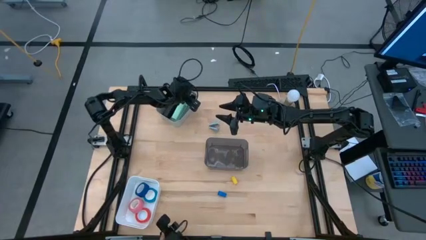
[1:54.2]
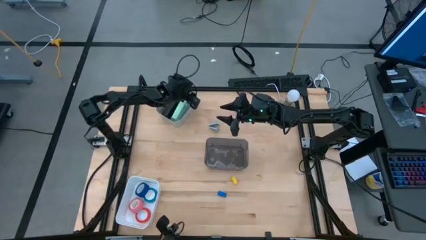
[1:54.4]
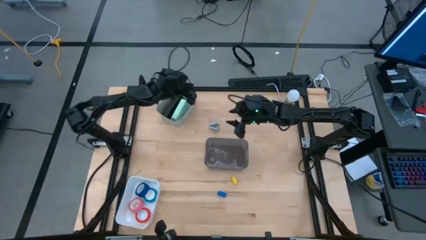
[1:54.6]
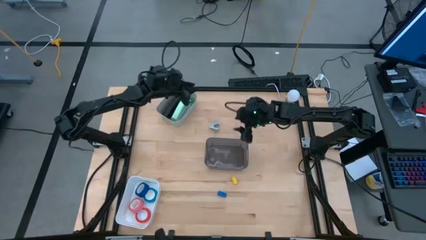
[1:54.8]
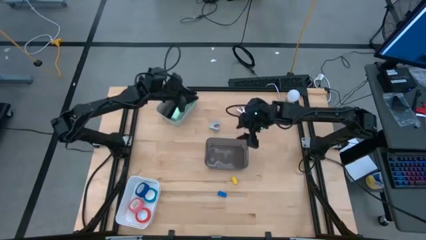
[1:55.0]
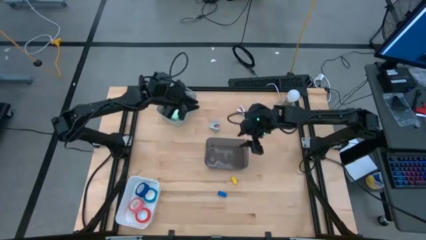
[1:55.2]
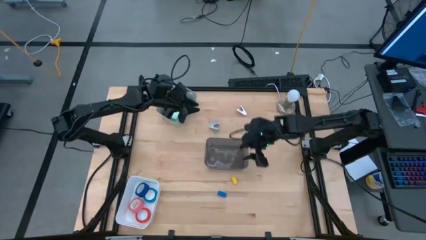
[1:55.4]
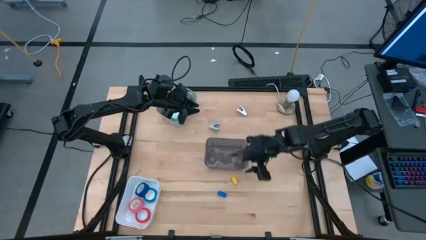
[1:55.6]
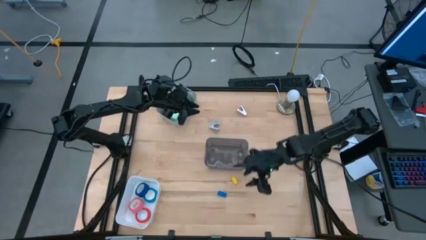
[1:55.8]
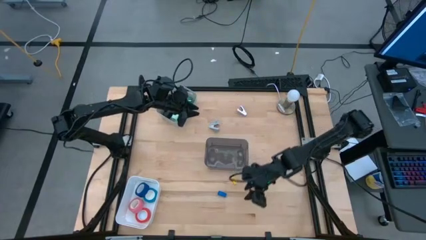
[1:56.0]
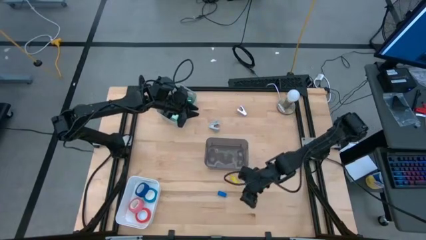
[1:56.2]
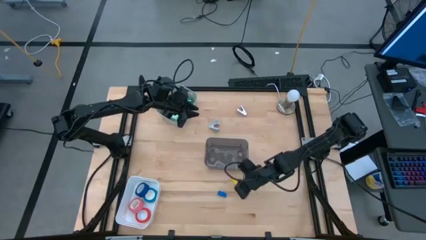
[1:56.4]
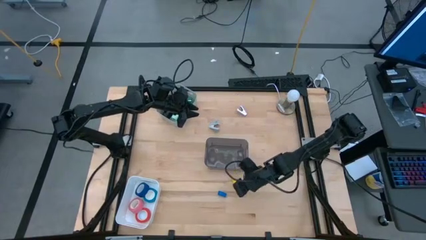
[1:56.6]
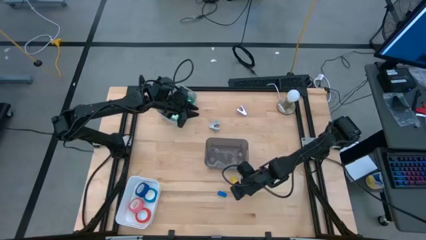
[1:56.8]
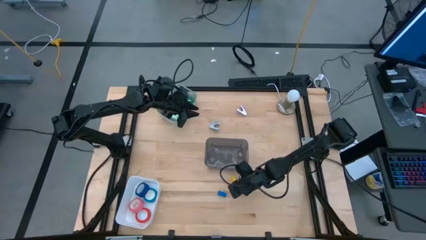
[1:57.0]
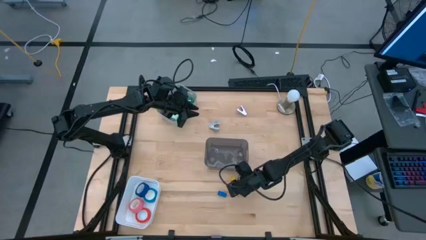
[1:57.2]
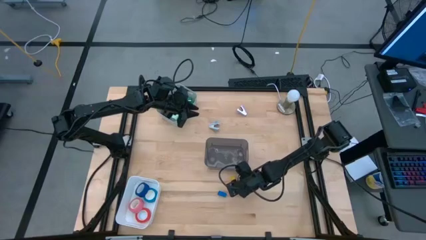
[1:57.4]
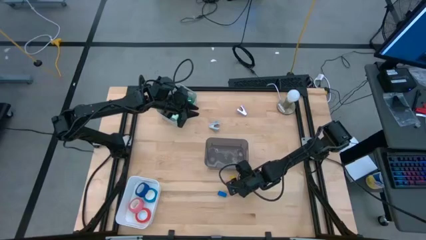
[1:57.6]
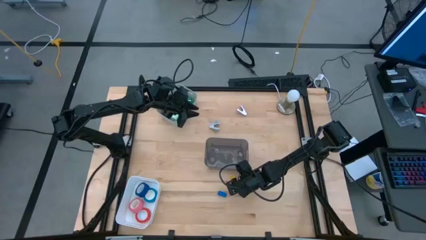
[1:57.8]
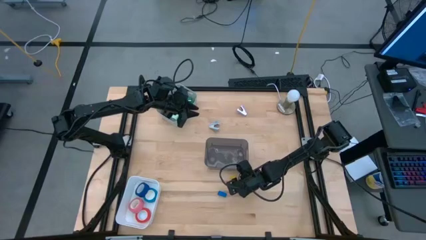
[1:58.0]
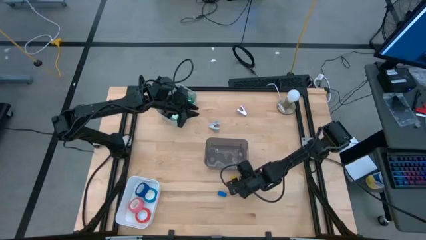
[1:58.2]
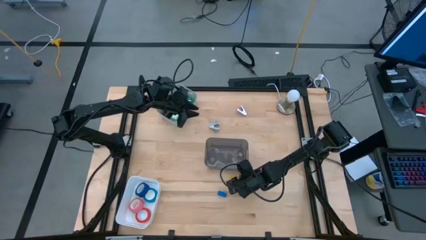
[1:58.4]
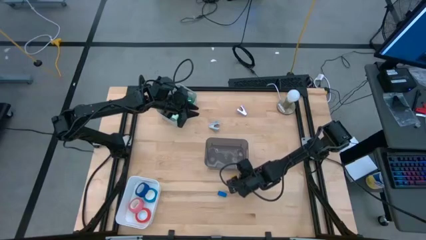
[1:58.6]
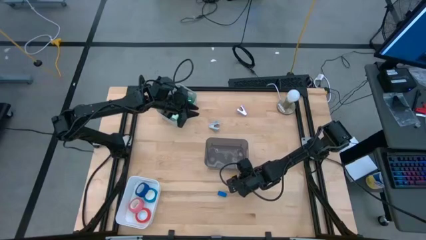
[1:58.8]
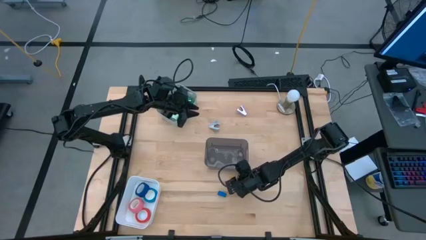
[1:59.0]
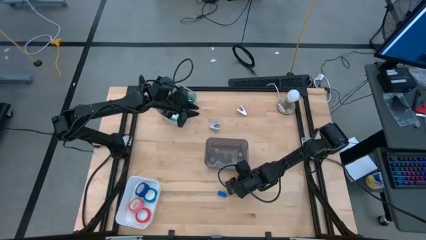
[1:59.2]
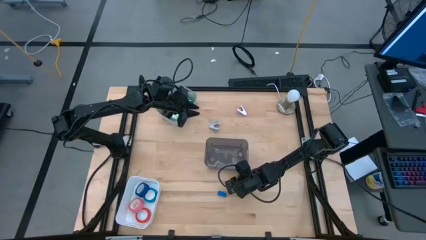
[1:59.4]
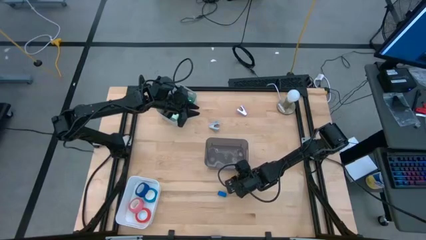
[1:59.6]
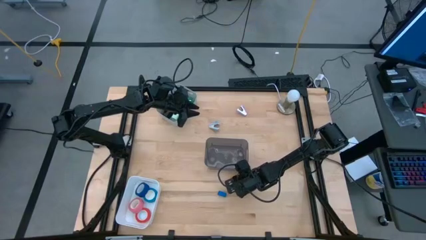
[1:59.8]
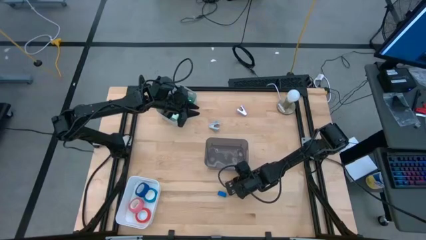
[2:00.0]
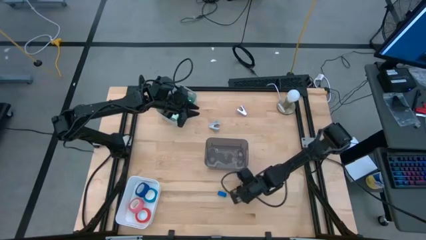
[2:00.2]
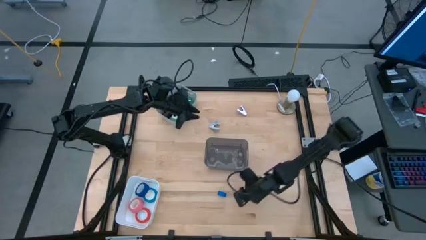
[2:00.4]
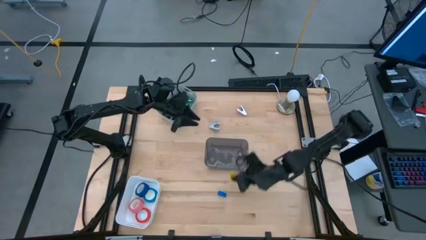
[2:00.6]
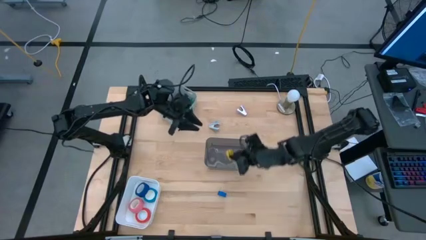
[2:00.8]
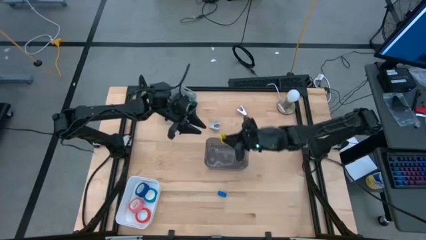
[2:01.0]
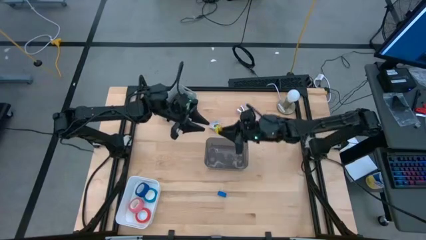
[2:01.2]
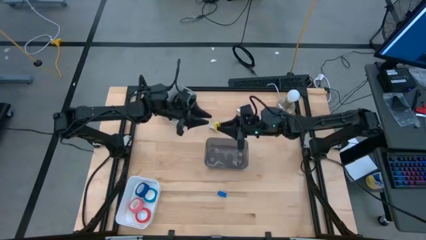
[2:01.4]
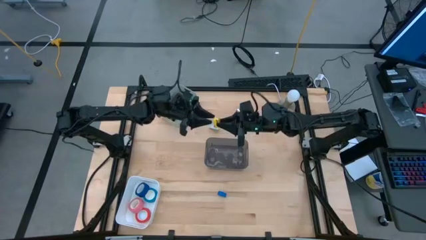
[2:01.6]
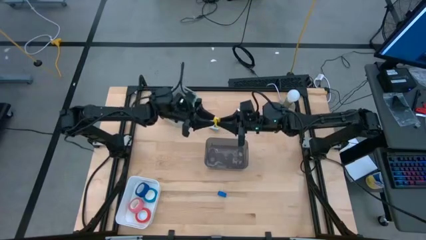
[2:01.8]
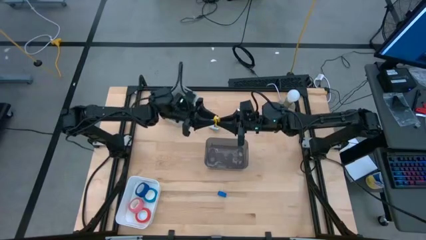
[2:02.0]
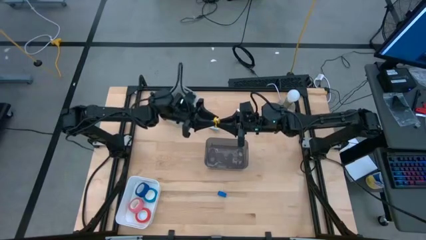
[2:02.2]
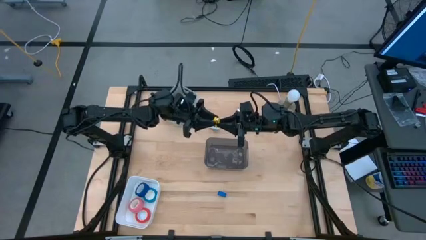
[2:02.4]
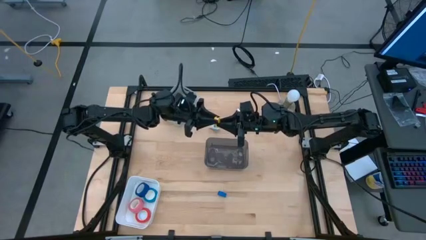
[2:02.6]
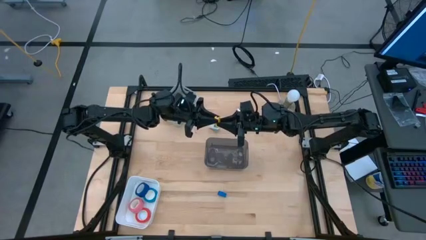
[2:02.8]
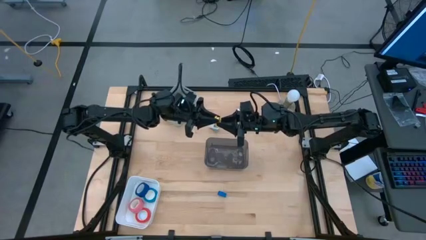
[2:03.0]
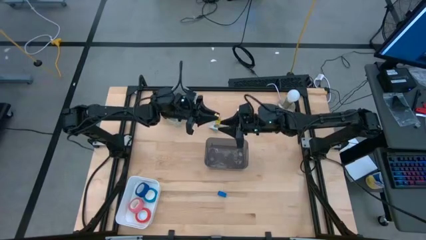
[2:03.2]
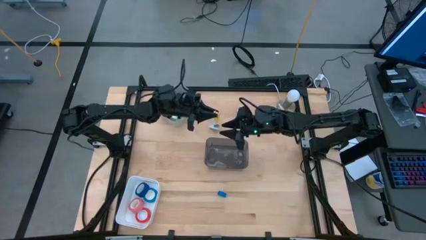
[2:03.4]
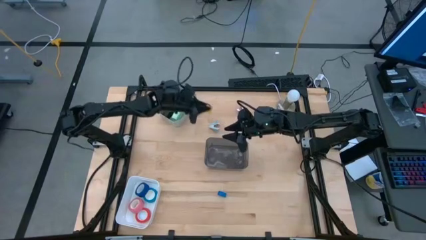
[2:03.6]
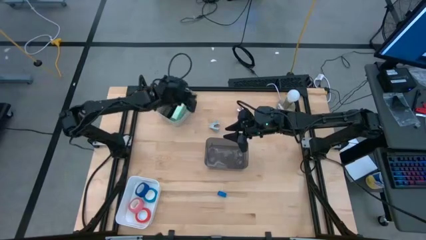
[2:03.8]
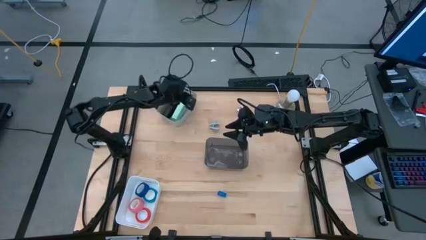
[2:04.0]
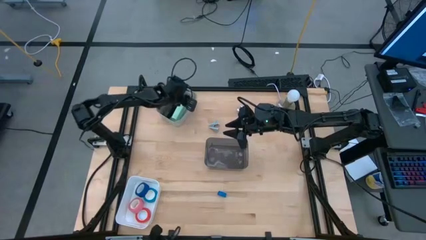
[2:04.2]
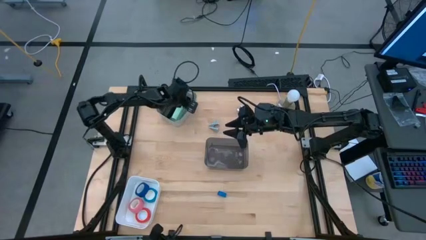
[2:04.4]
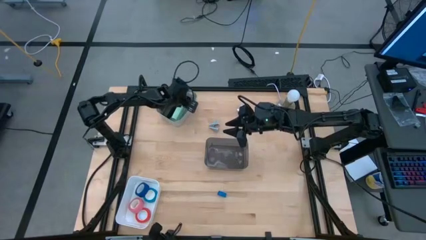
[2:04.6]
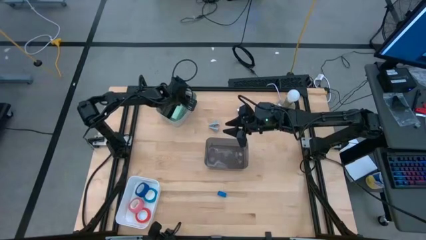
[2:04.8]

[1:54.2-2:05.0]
Task: Pick and place Stapler, Stapler remover, tape
Put the small yellow stapler into the gray bin

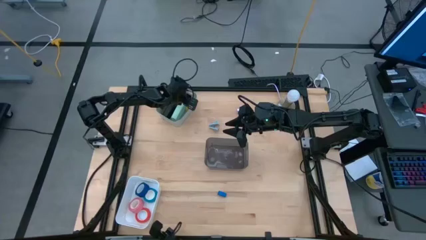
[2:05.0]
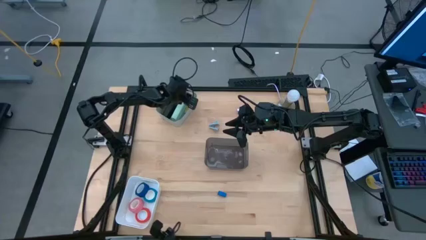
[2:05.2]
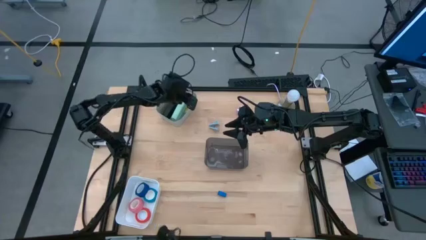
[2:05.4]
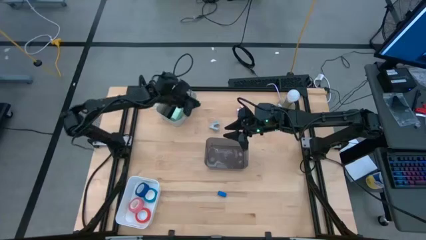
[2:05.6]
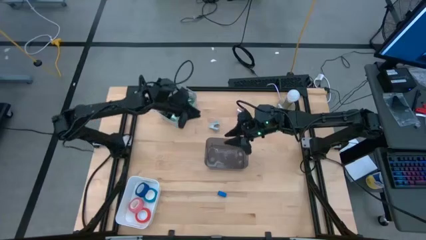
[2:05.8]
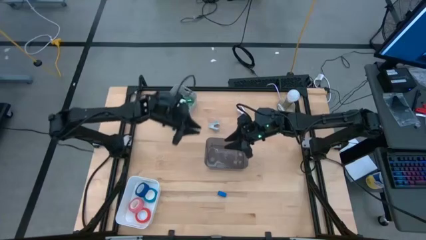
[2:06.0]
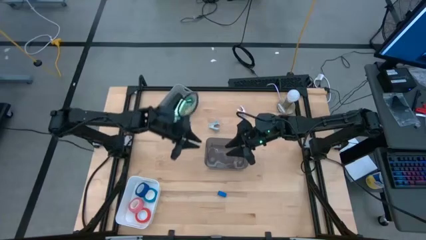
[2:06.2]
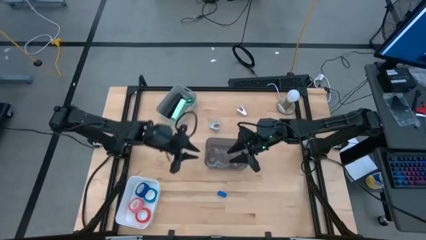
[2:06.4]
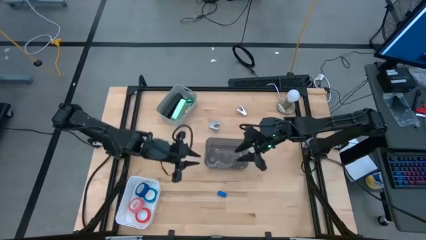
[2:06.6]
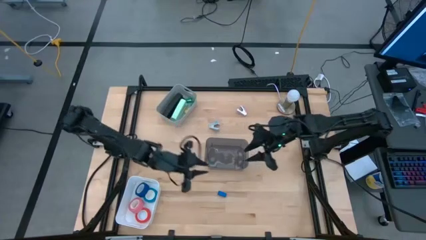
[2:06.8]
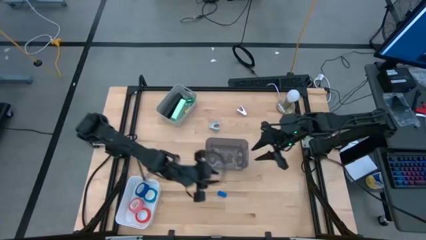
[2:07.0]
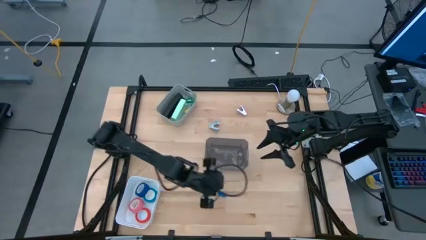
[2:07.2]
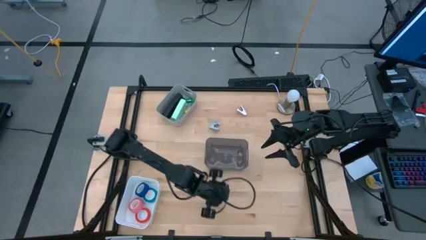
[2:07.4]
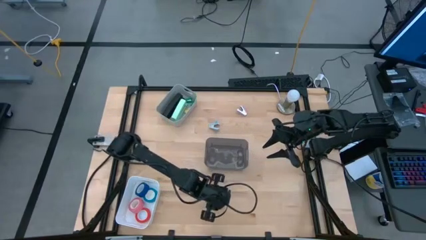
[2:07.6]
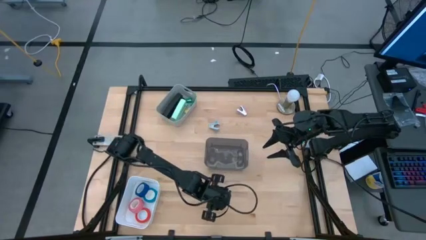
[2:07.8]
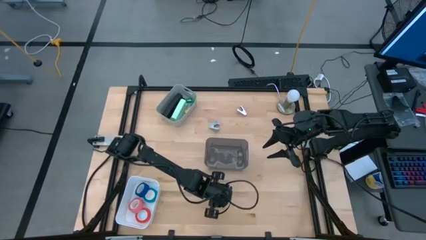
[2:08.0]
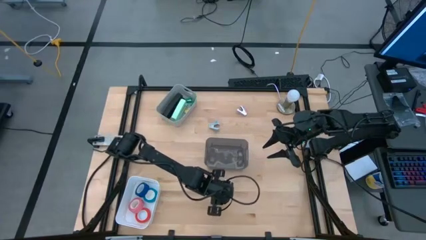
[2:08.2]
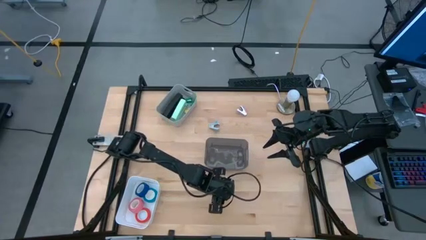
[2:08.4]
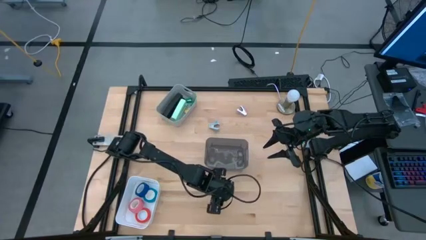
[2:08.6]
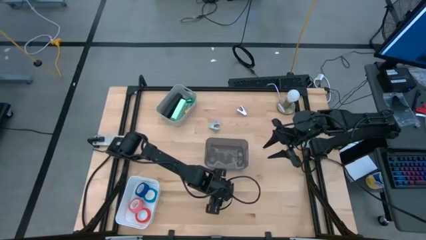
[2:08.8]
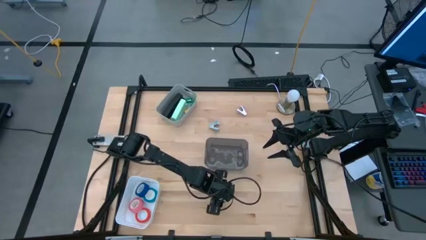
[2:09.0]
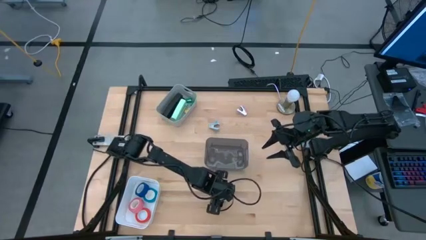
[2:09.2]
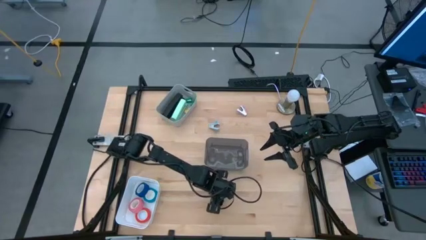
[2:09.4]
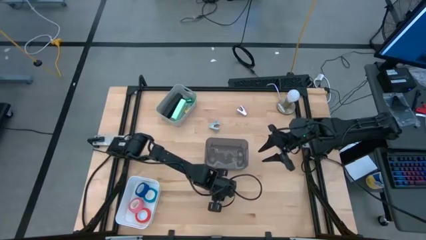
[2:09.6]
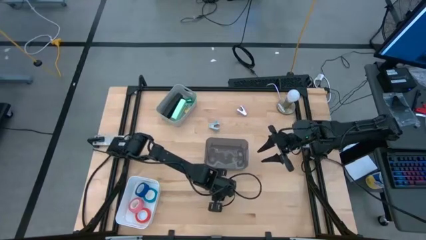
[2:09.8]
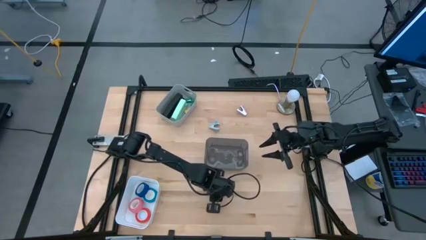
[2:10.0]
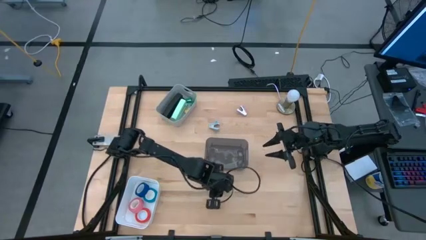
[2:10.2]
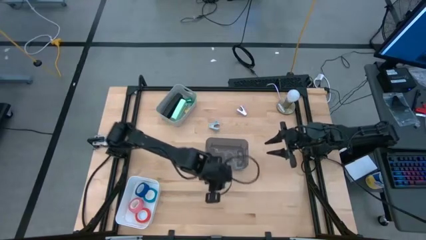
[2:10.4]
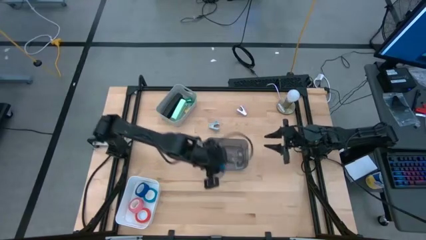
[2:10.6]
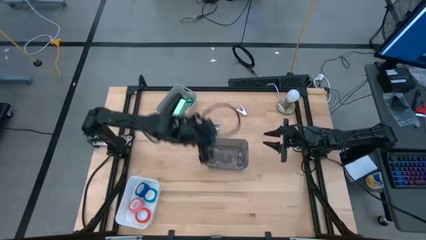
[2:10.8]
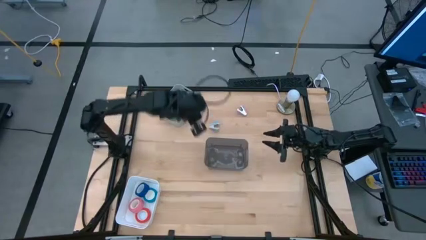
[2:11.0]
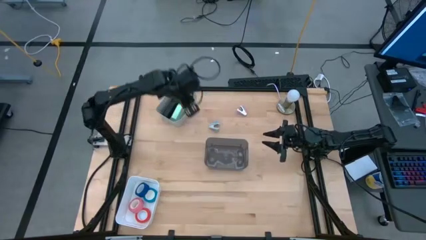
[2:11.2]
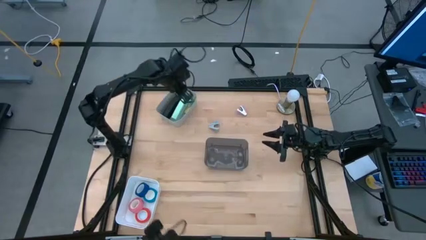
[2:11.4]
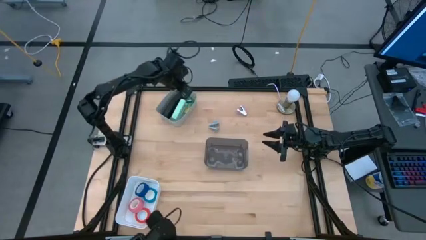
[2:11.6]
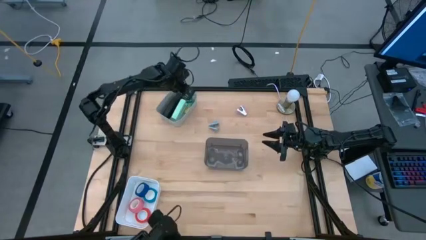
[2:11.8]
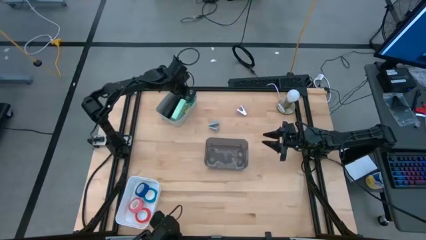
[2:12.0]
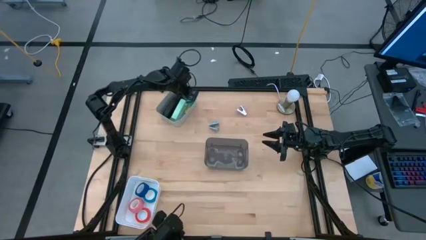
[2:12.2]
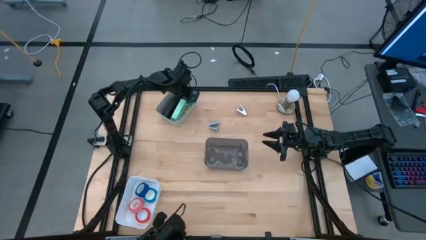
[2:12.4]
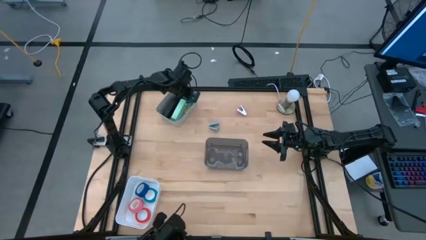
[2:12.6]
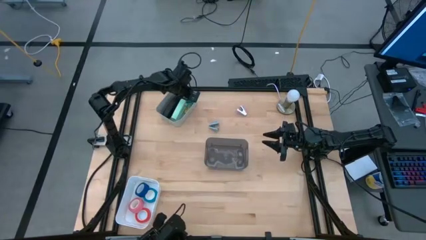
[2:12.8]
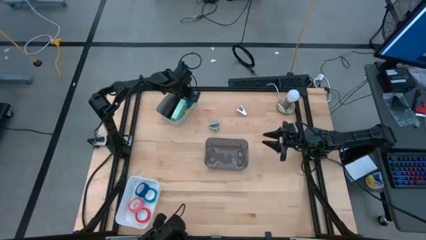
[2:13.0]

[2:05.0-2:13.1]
Put the small blue stapler into the gray bin
